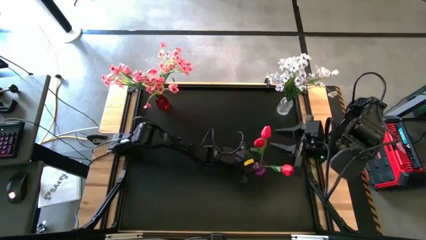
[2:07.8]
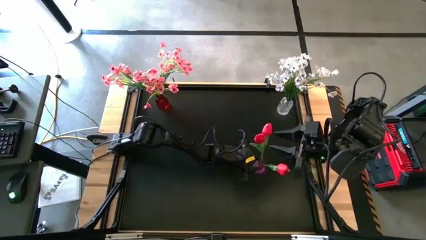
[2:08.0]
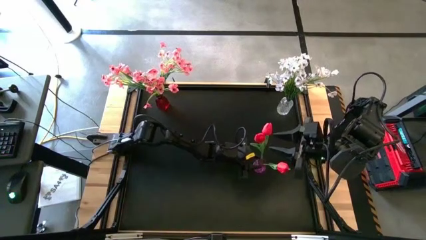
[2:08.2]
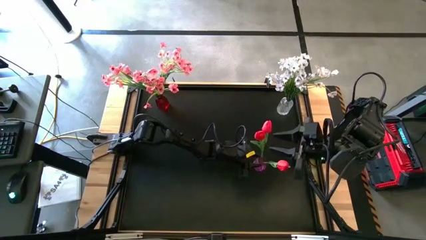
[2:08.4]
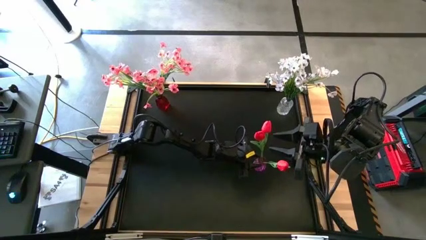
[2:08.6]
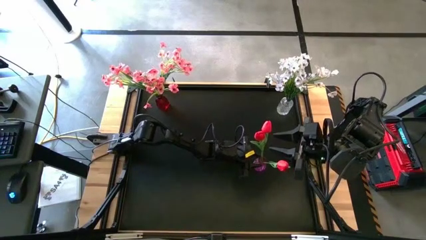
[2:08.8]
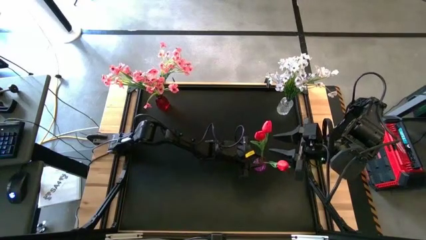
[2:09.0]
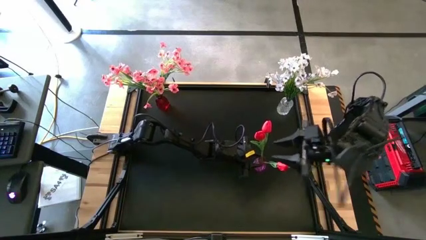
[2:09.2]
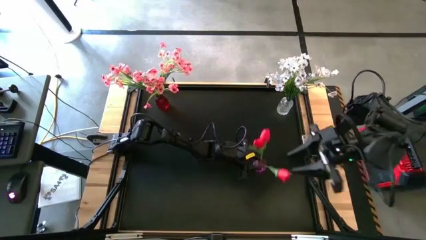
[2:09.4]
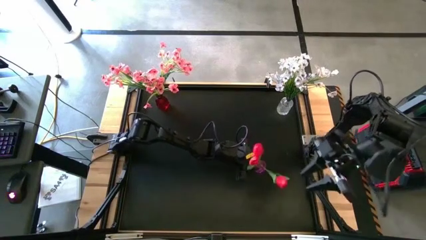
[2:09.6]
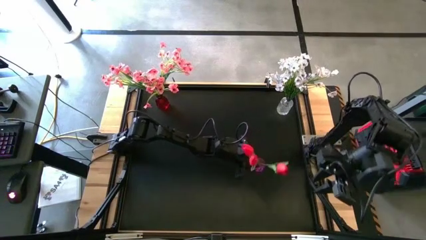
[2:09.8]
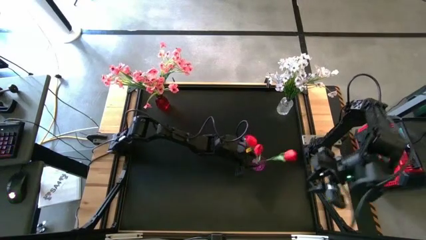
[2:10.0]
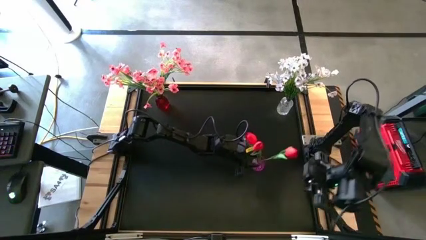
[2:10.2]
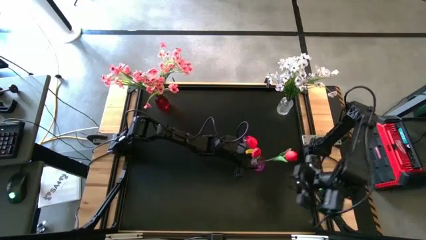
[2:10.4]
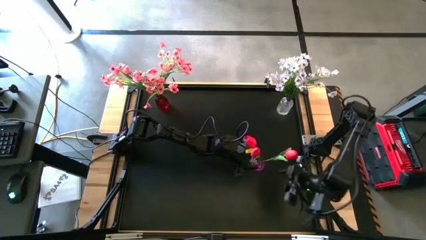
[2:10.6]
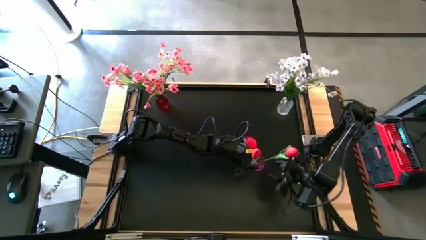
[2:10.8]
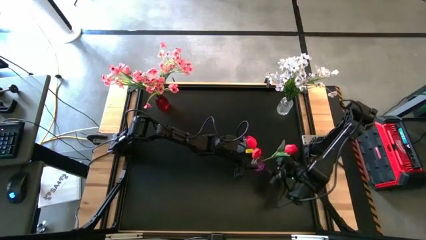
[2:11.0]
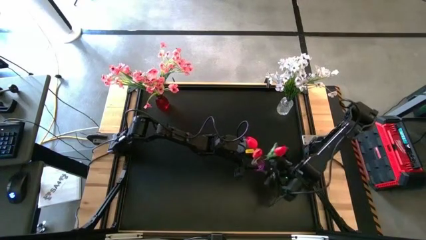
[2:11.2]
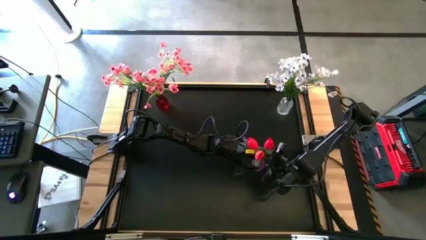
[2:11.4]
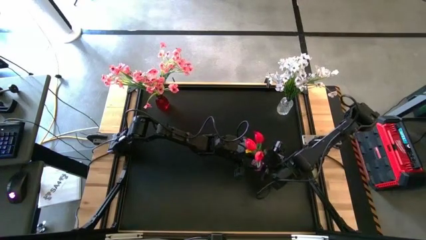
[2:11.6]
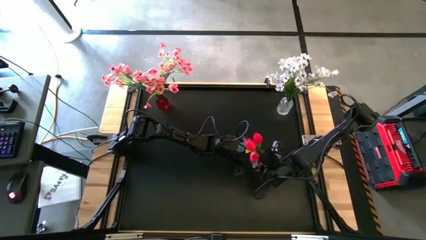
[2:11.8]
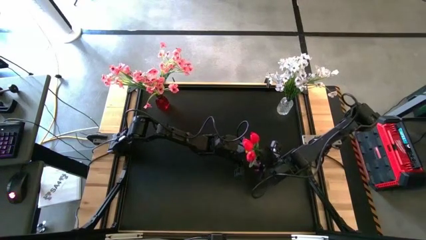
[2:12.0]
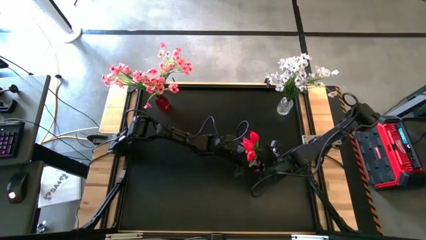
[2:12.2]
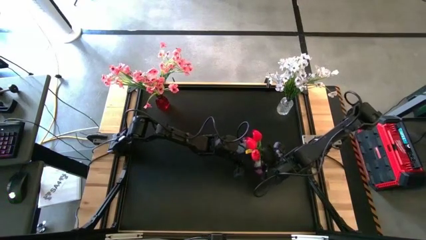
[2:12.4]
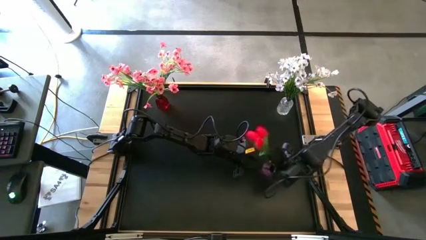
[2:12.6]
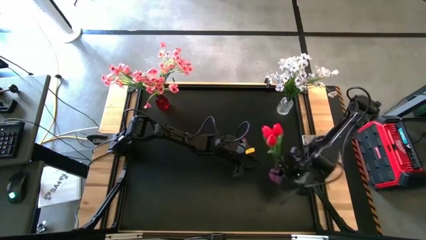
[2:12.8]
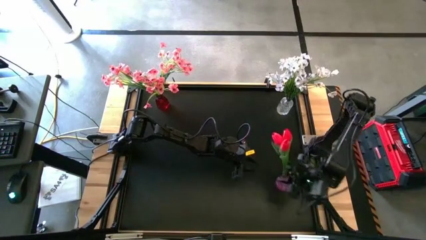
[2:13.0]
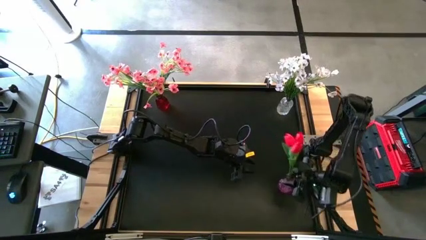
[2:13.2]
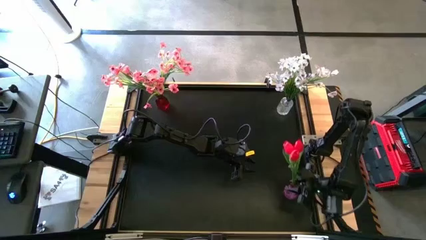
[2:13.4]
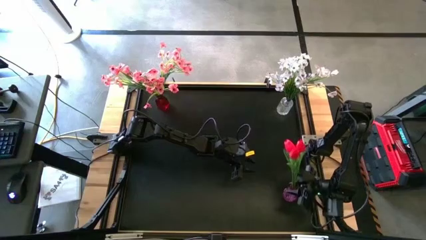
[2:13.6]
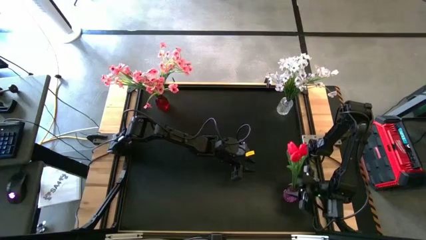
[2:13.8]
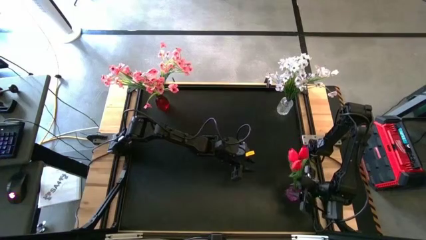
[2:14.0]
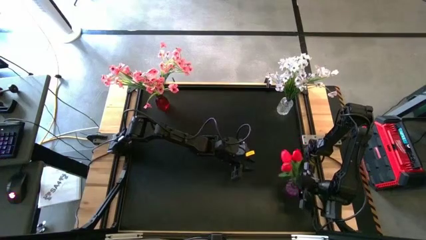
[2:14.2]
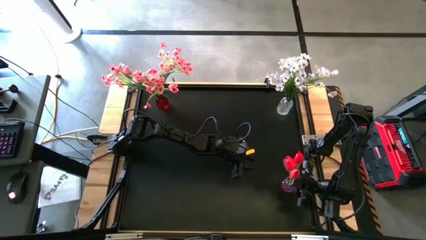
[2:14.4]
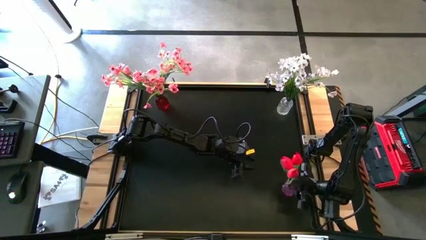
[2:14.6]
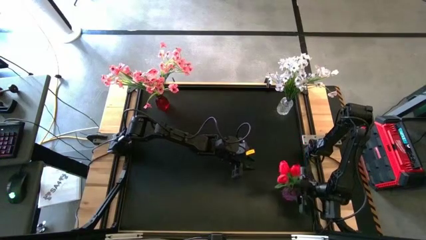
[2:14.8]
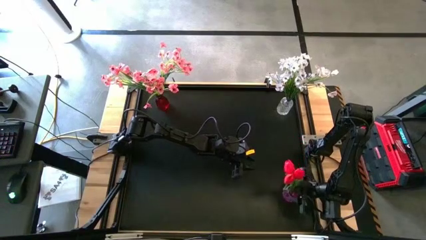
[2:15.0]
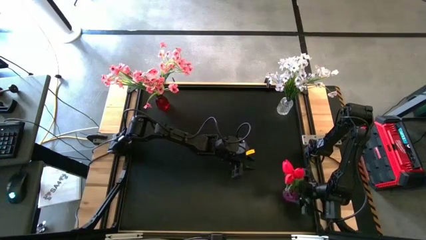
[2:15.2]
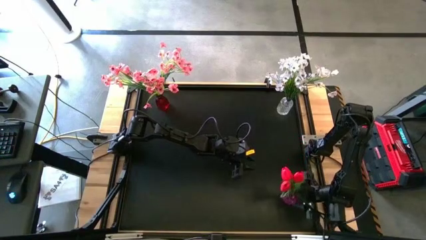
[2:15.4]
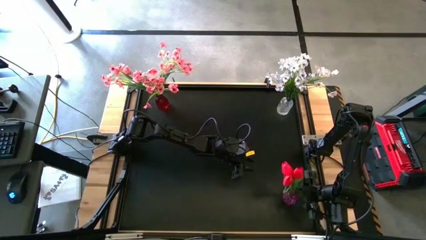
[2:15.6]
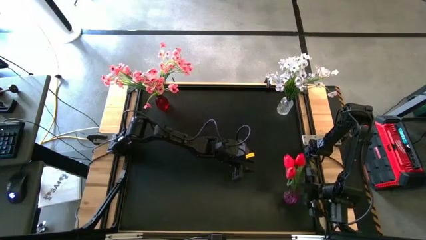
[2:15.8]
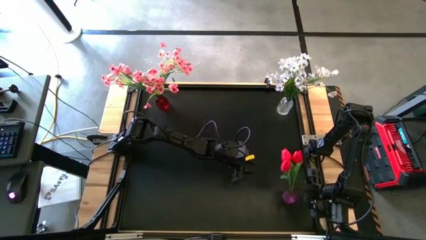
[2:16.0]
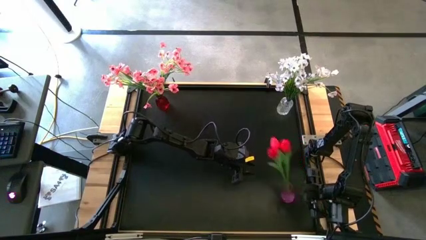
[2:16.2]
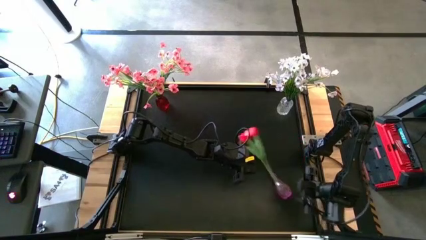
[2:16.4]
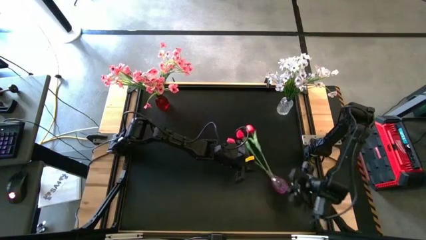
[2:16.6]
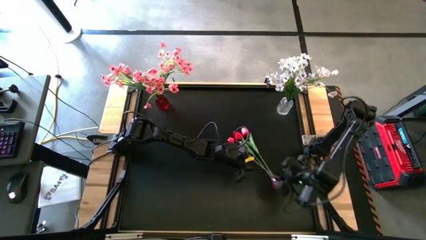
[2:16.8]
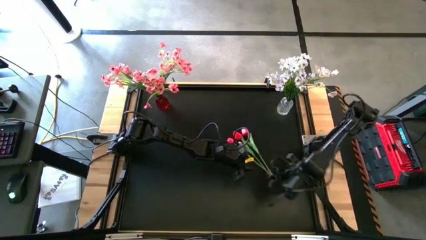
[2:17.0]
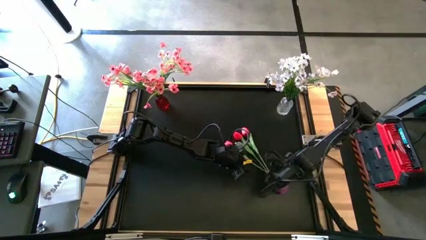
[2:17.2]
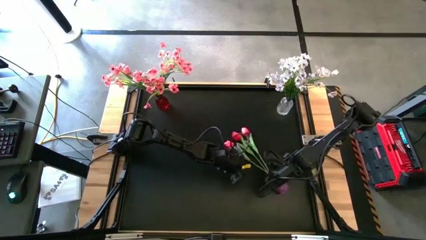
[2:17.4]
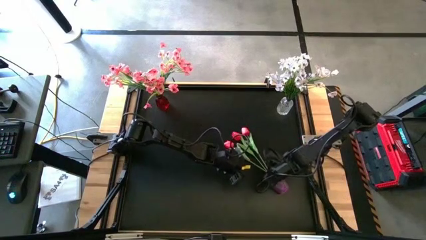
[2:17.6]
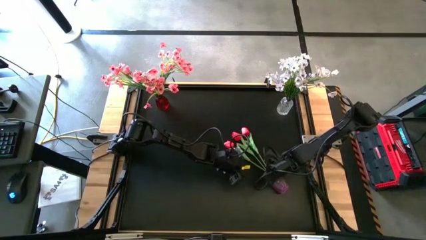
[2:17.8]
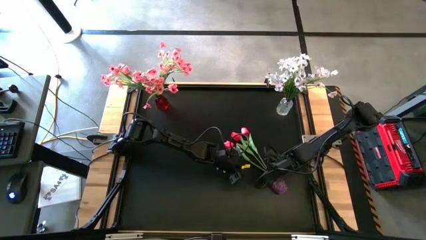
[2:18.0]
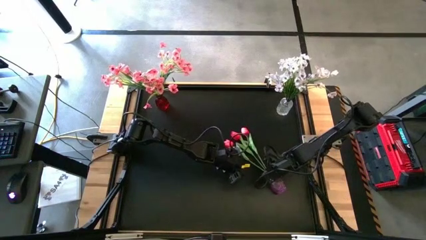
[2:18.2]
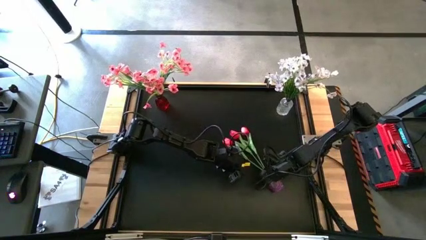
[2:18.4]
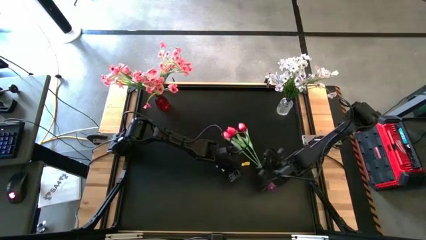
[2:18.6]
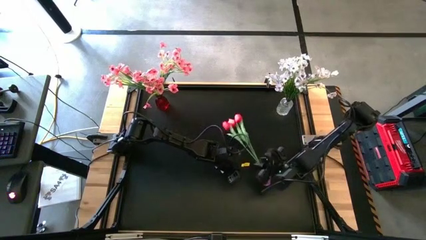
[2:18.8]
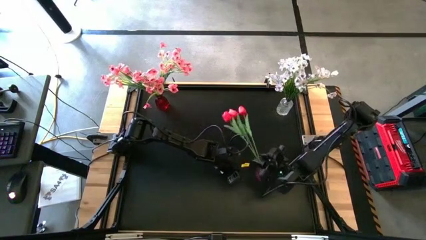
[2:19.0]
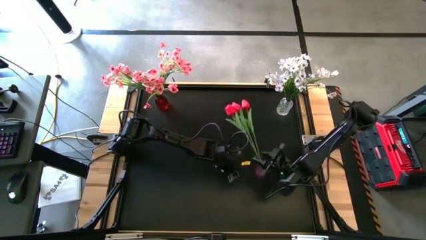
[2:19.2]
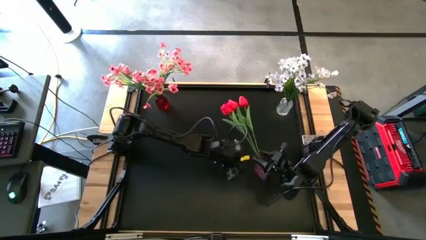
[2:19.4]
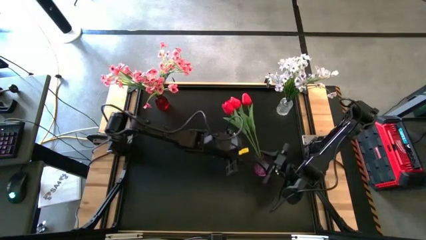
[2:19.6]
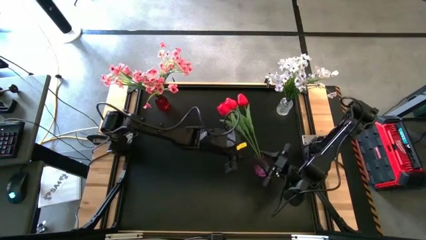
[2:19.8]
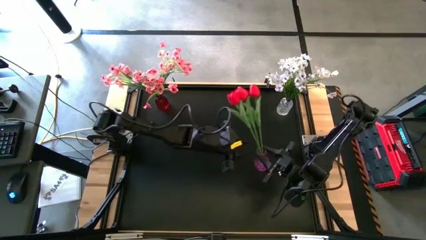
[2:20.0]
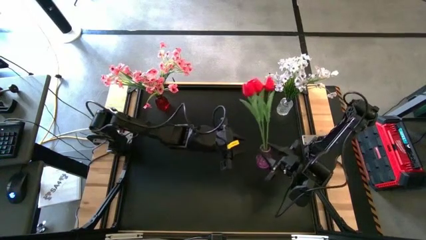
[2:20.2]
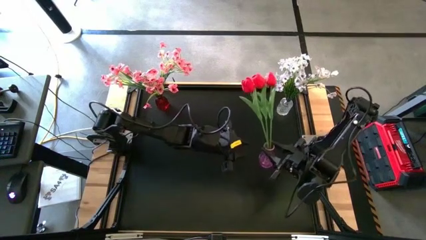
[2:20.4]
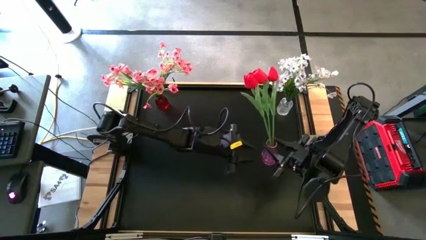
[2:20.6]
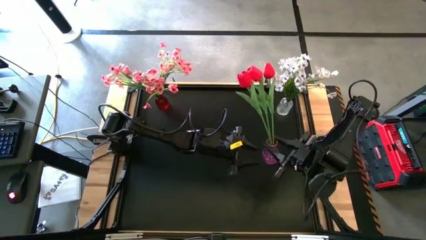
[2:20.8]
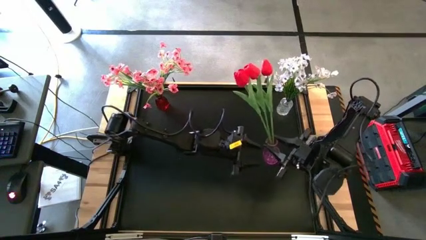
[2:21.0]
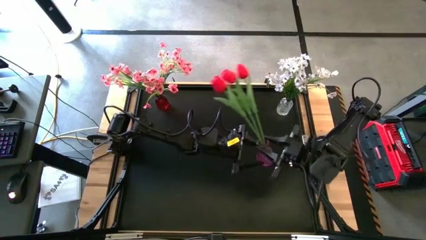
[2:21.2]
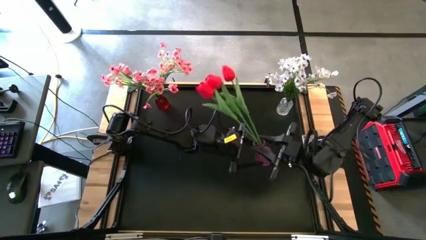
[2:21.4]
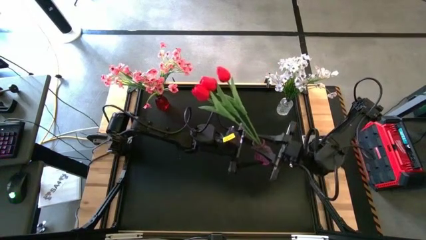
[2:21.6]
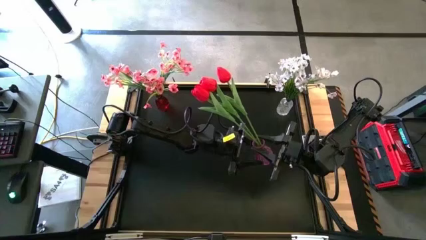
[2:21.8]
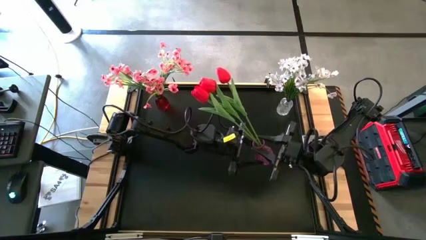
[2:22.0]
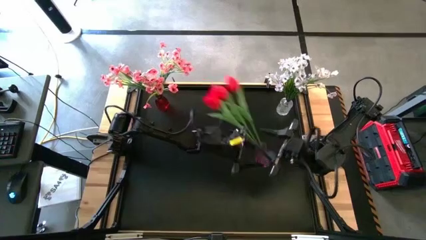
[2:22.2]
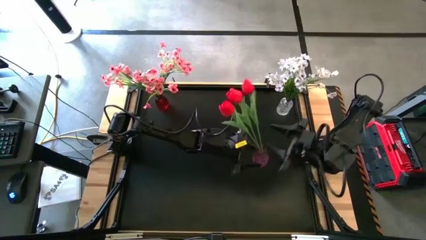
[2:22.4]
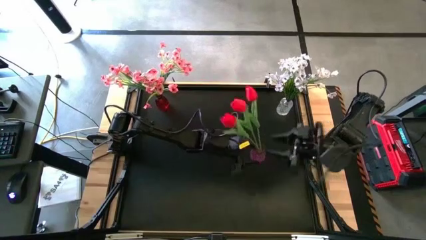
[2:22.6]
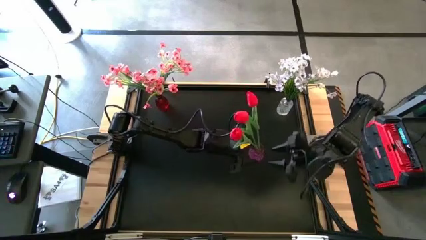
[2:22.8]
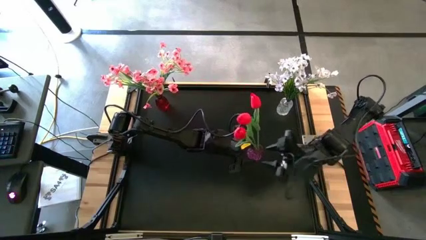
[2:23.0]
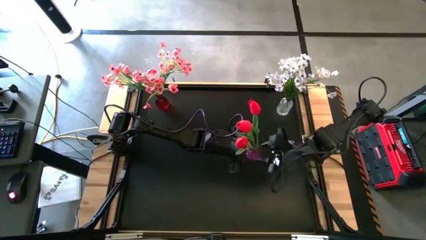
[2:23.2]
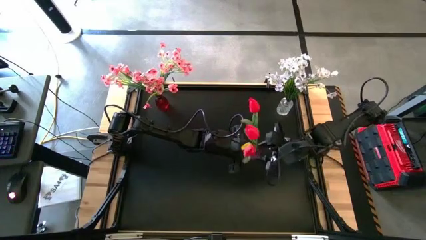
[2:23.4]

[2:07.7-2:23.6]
Task: Sort flowers into vase by color
Adjust the purple flower vase
